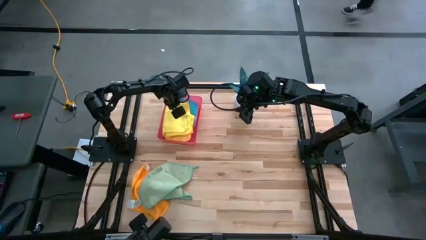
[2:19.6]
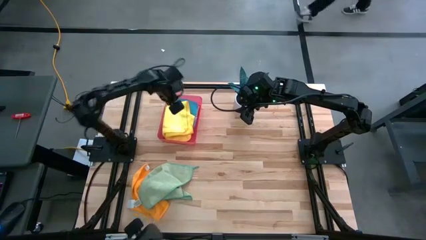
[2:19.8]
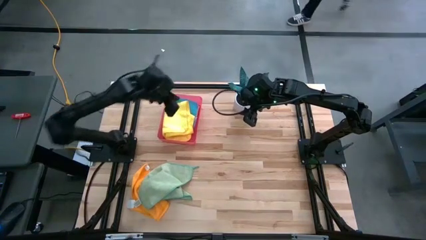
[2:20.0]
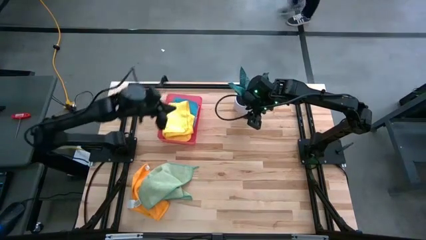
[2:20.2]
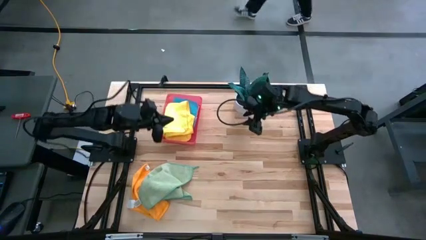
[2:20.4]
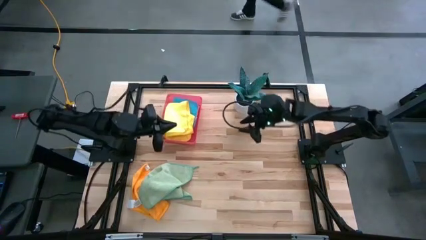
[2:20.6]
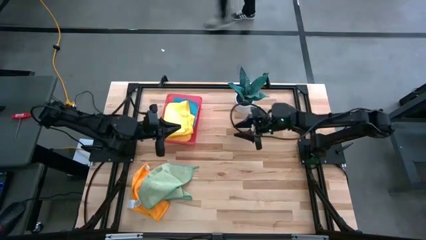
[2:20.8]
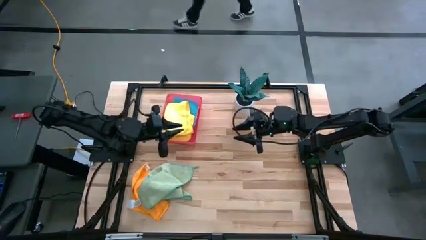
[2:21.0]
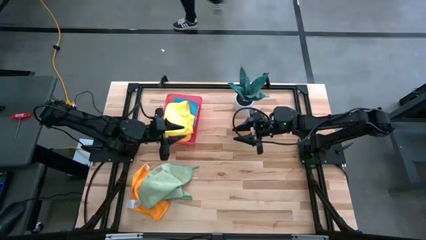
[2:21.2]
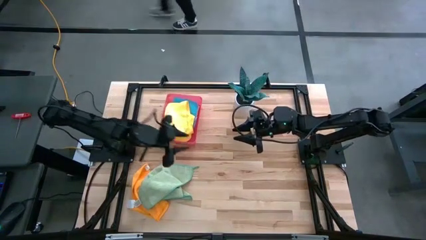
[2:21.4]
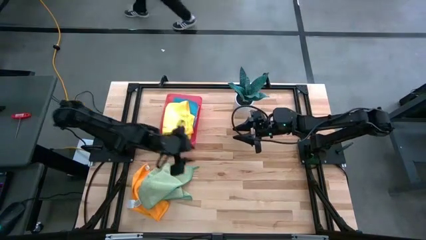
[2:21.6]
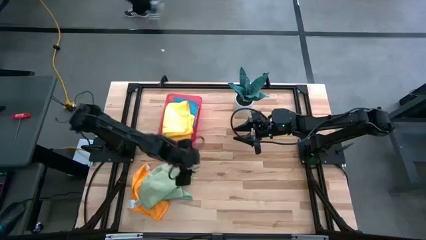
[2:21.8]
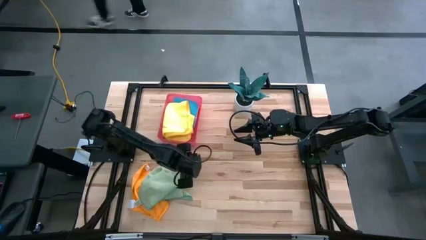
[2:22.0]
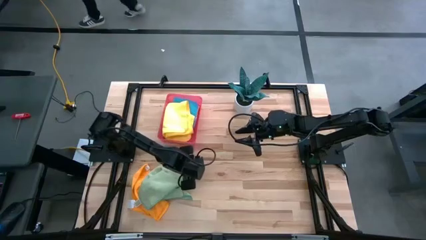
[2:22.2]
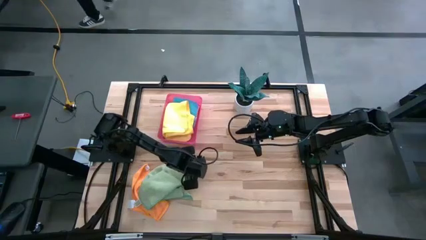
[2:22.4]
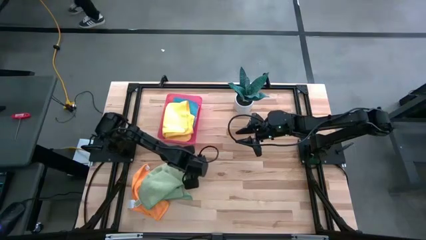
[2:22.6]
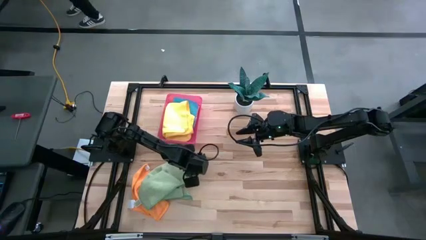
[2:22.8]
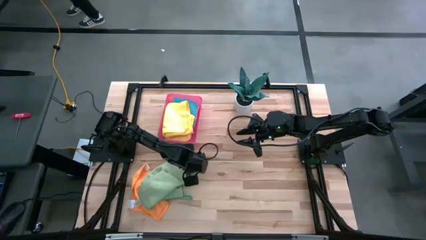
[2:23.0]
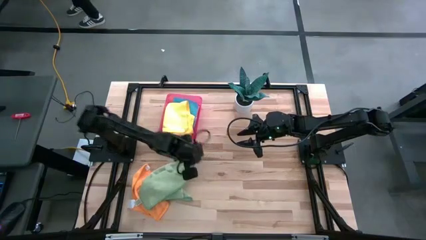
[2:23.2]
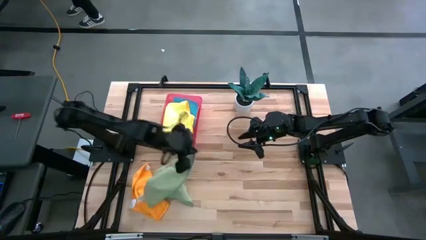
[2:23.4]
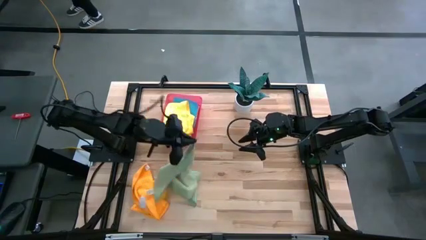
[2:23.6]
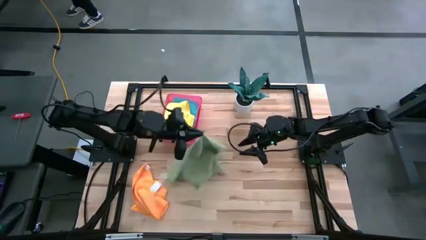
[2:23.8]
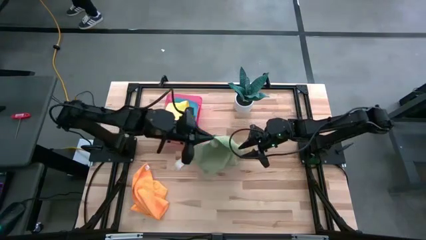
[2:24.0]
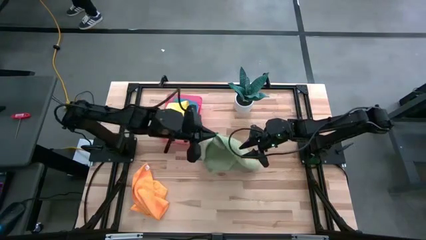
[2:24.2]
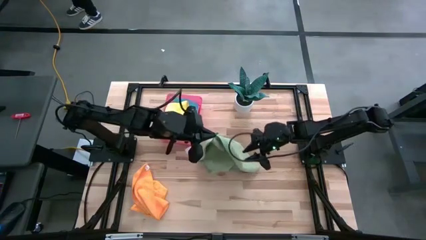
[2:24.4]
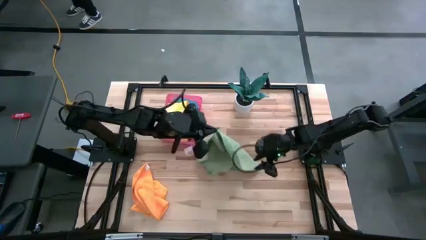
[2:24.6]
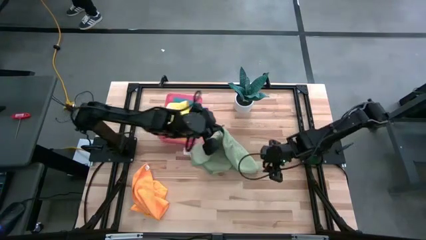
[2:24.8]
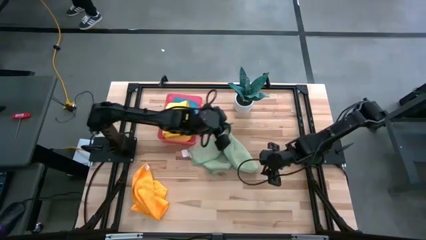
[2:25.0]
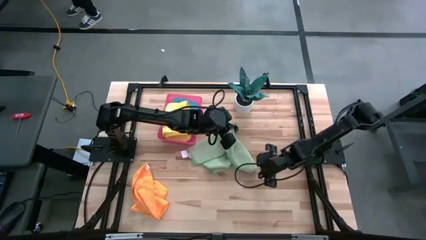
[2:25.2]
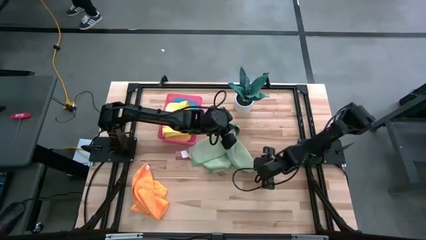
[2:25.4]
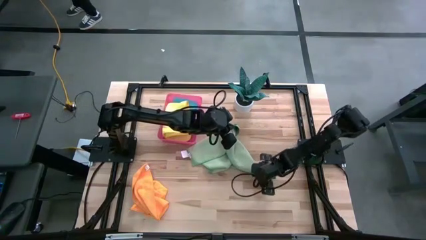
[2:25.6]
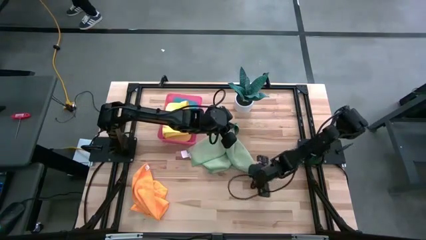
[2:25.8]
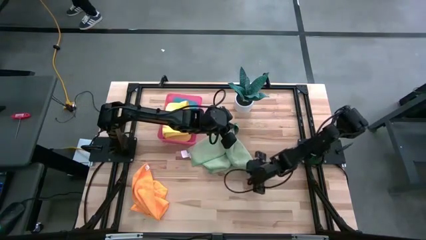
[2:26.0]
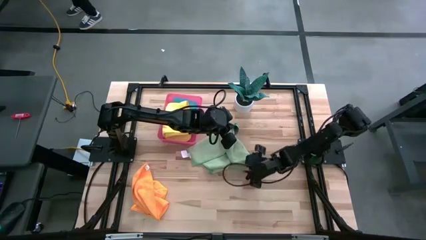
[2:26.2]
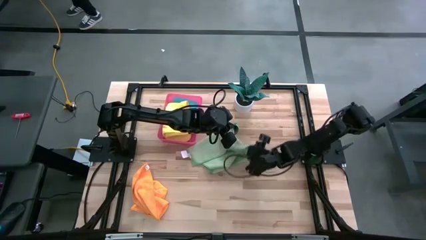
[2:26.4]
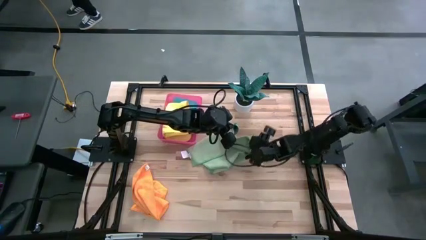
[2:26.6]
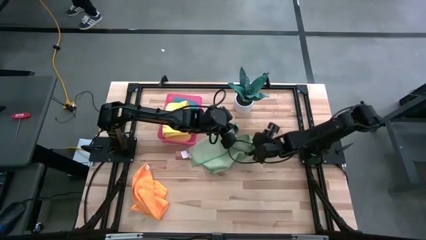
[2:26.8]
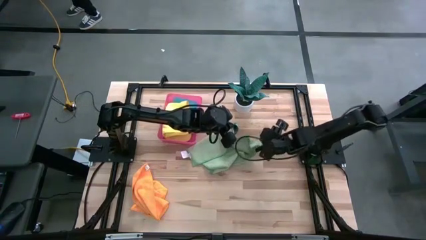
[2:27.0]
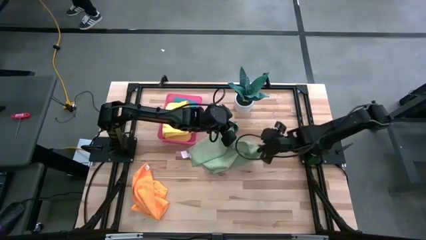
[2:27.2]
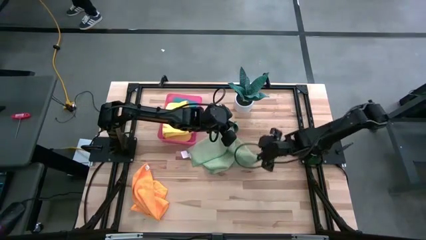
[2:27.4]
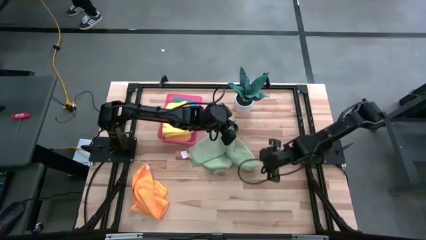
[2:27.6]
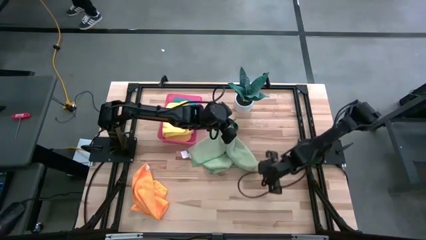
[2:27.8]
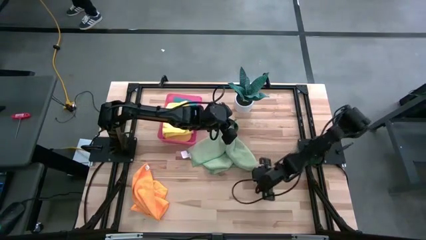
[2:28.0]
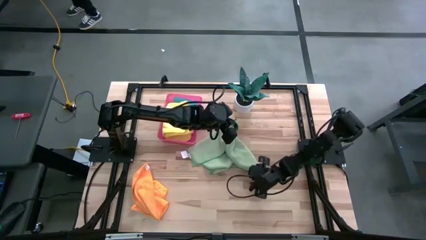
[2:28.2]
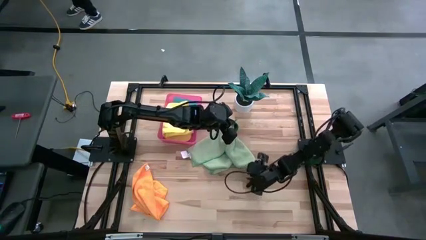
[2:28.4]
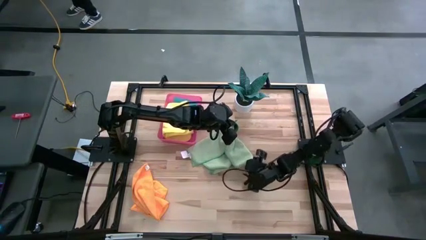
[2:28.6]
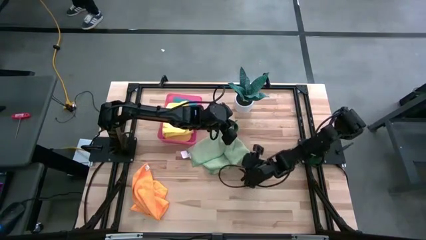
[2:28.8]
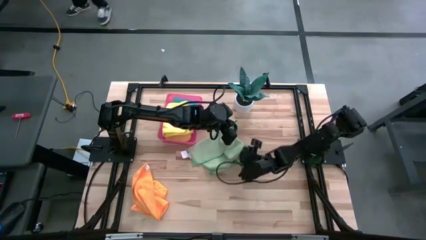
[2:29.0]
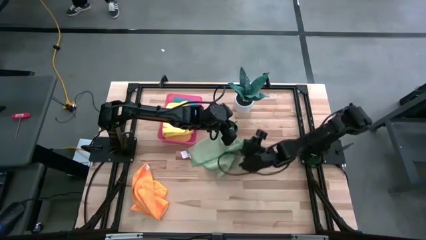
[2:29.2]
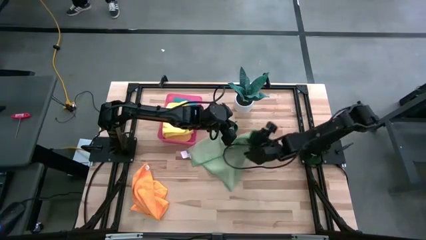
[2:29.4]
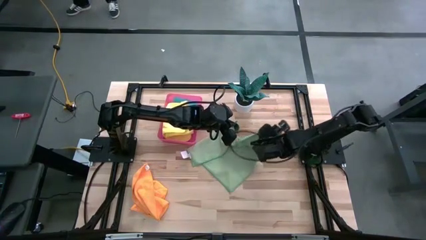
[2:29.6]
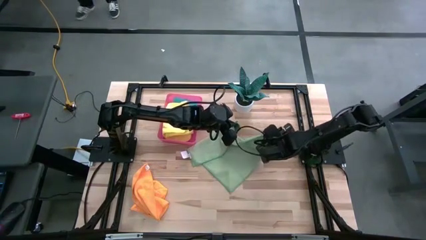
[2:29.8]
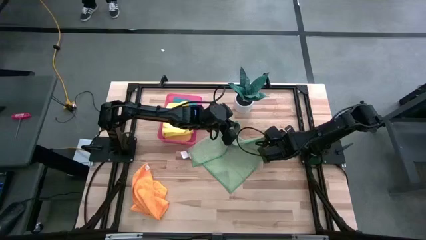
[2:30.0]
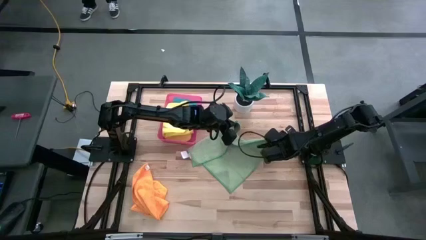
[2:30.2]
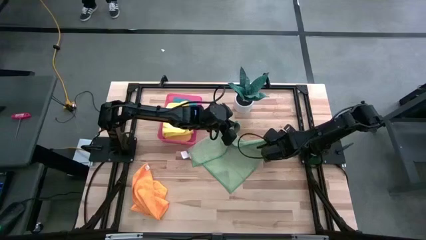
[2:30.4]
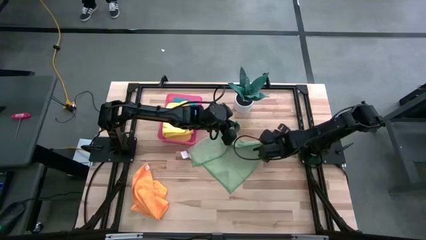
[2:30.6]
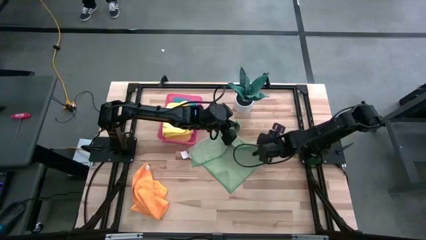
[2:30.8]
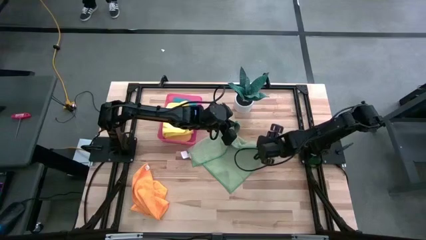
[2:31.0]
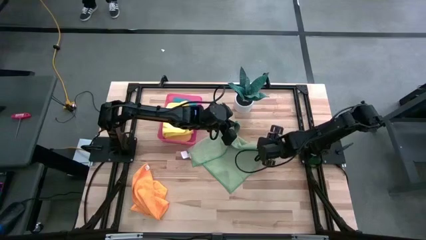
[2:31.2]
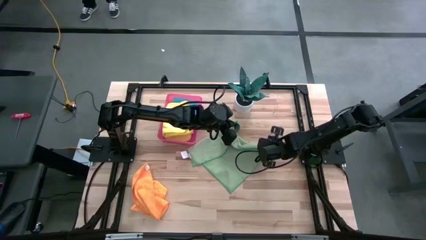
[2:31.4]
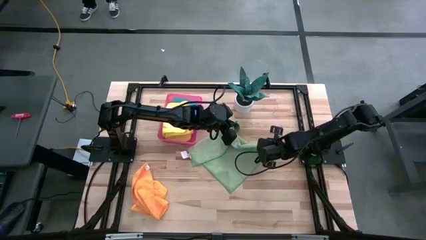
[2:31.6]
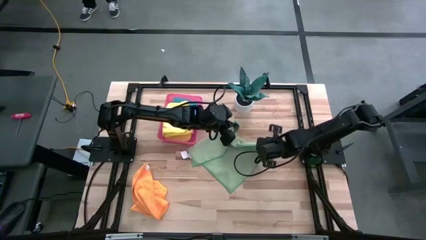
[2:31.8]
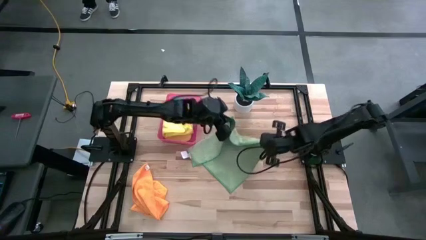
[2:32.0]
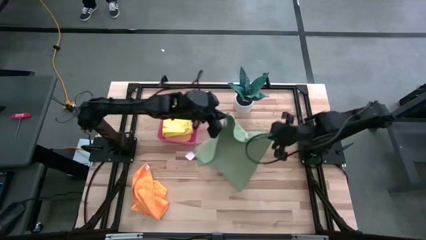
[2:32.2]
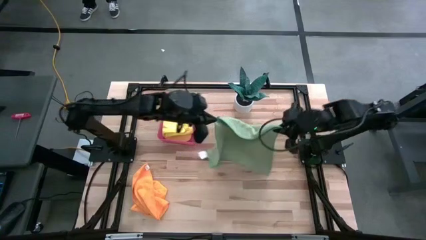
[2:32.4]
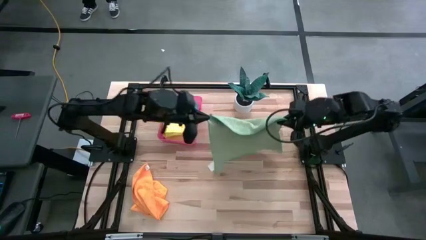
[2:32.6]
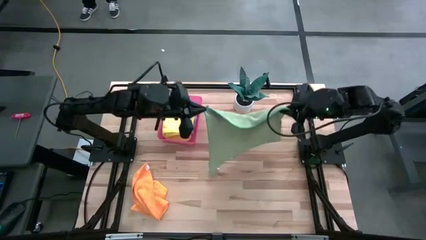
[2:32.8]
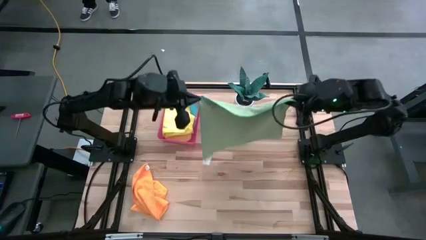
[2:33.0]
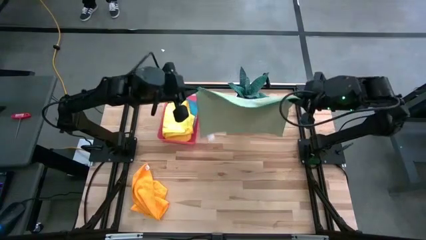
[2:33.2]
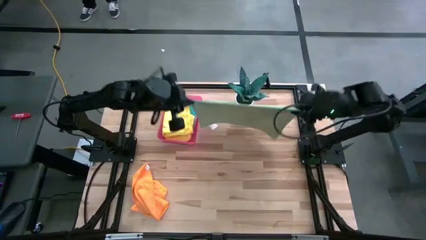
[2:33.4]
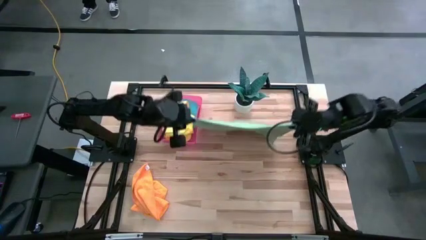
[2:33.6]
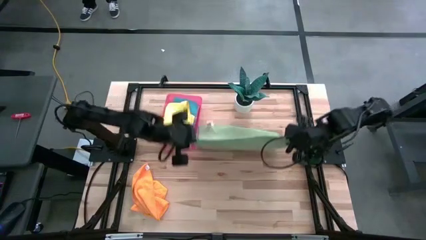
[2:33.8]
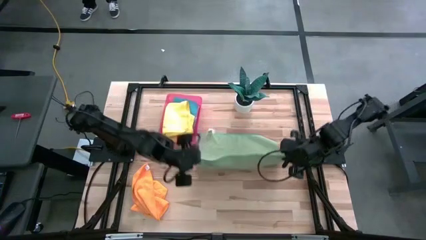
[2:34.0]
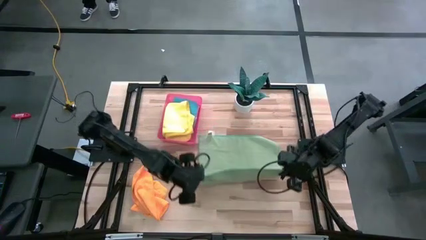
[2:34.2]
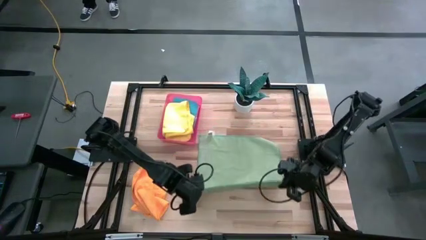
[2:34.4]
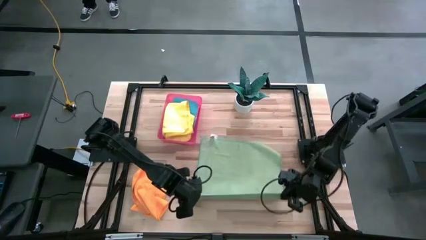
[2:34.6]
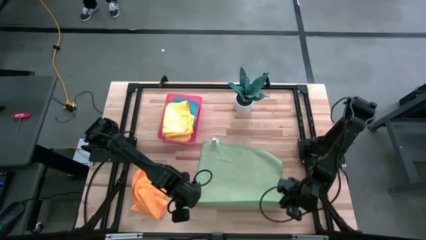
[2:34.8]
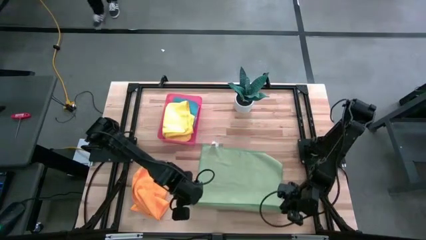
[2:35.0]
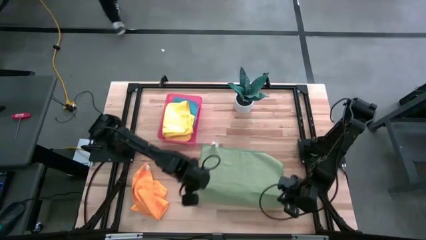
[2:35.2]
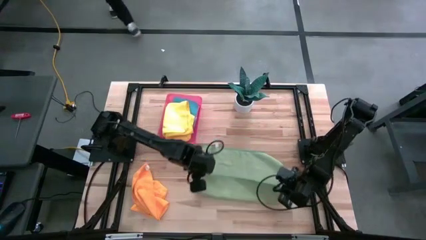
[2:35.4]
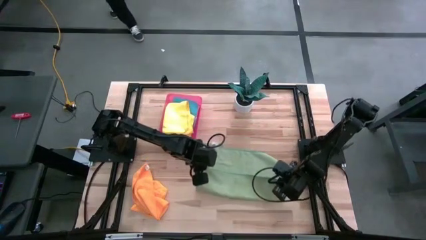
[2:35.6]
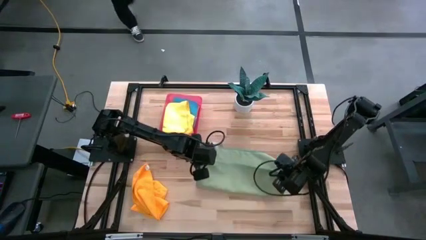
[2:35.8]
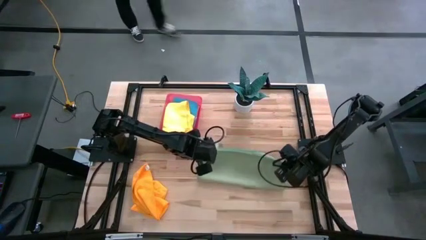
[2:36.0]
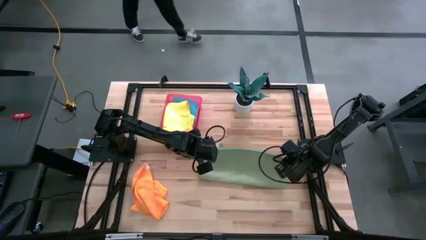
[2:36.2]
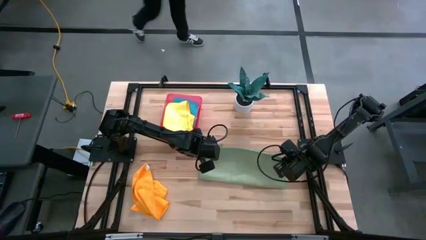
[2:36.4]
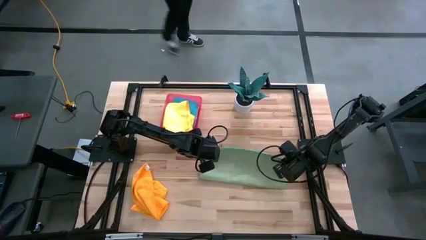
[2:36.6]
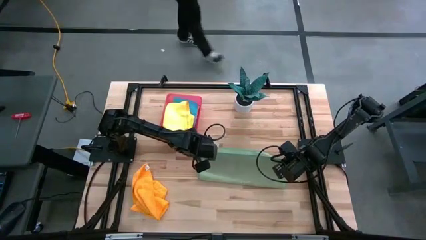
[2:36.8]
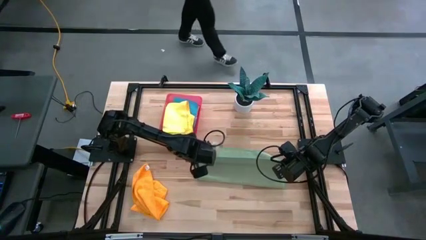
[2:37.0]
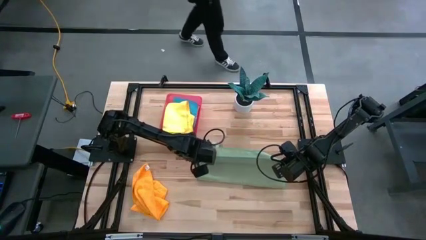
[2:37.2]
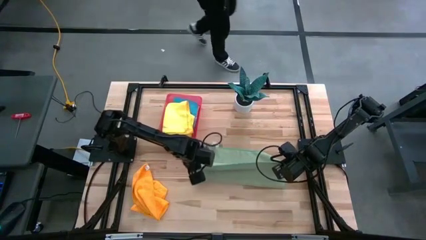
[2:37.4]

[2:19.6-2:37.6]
Task: Fold microfiber towels
Fold the green microfiber towel
